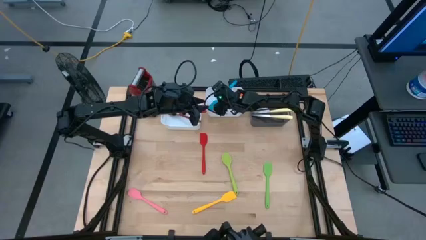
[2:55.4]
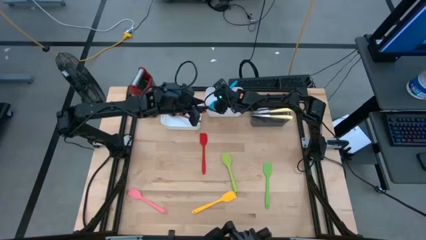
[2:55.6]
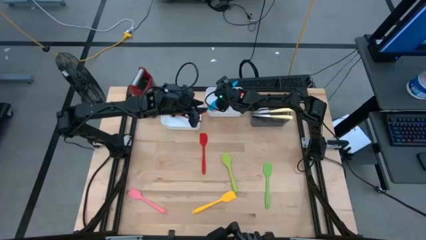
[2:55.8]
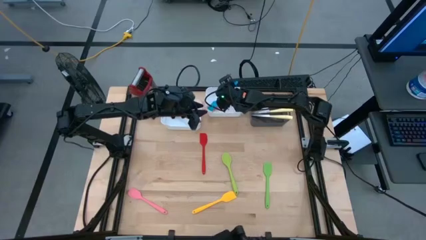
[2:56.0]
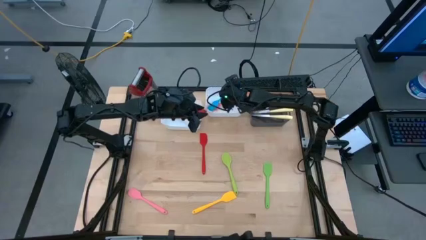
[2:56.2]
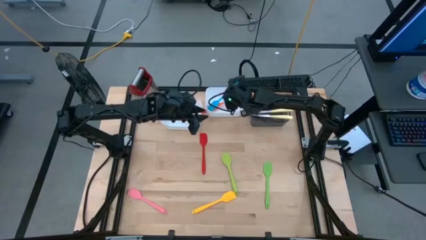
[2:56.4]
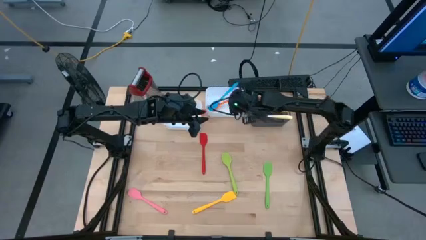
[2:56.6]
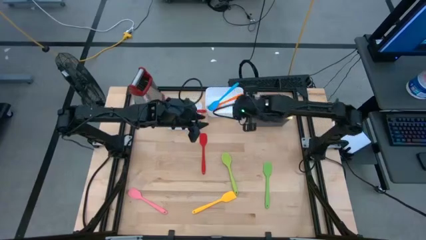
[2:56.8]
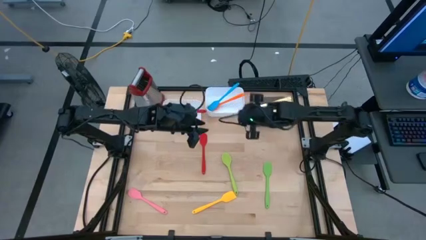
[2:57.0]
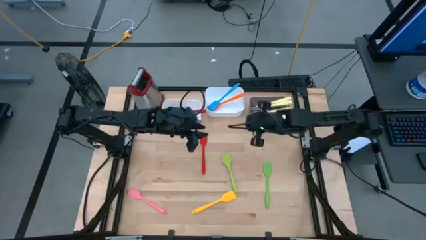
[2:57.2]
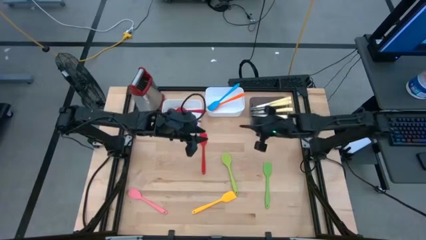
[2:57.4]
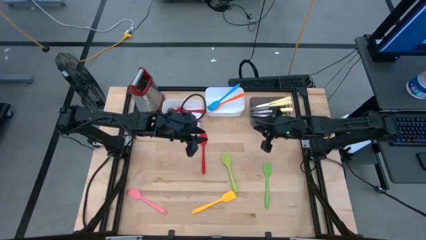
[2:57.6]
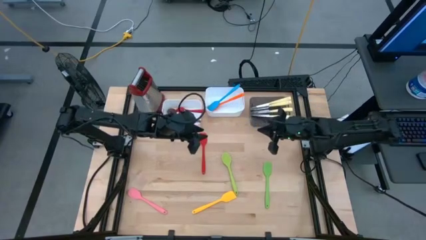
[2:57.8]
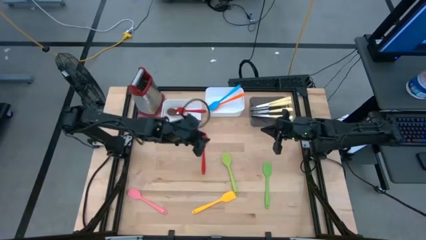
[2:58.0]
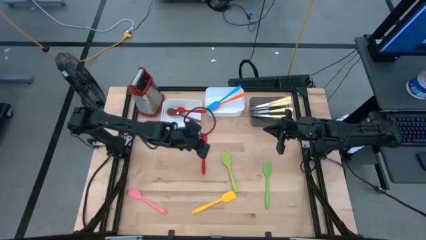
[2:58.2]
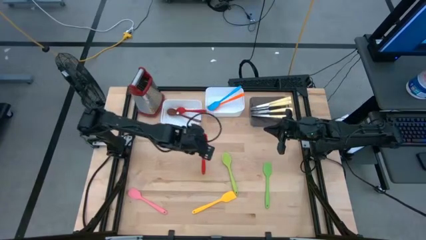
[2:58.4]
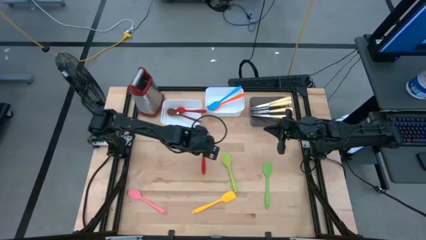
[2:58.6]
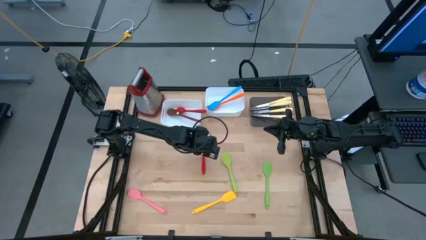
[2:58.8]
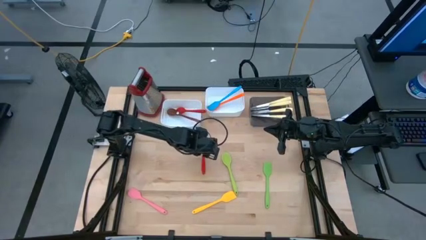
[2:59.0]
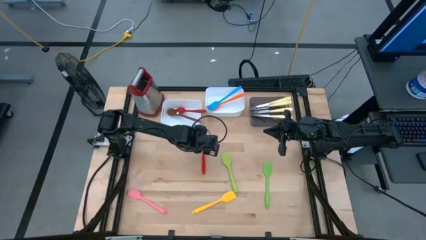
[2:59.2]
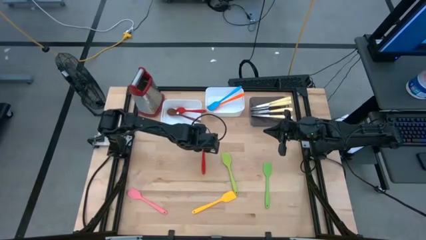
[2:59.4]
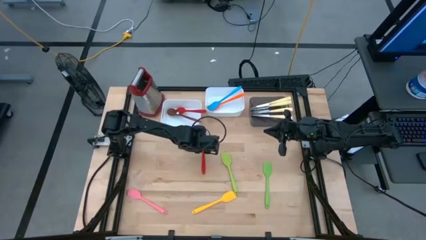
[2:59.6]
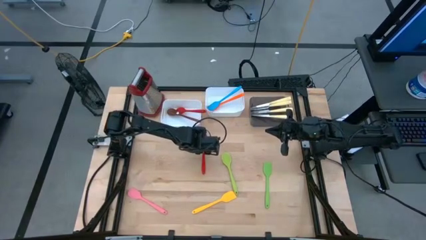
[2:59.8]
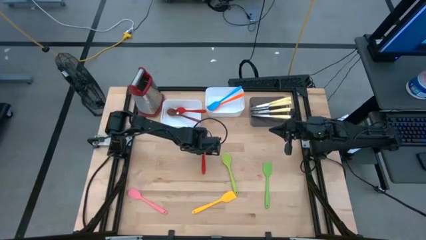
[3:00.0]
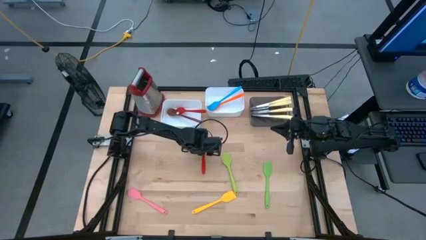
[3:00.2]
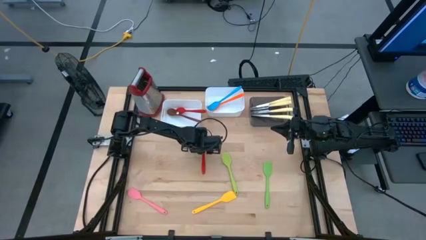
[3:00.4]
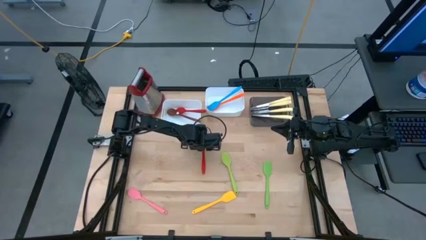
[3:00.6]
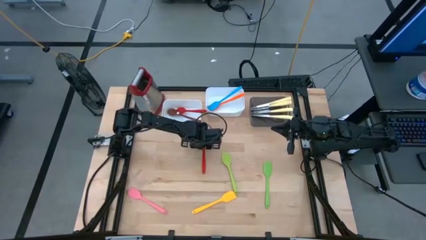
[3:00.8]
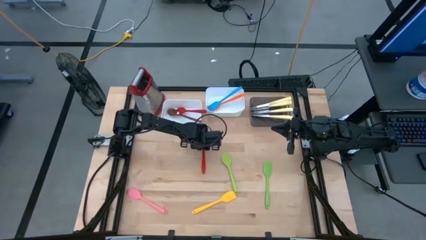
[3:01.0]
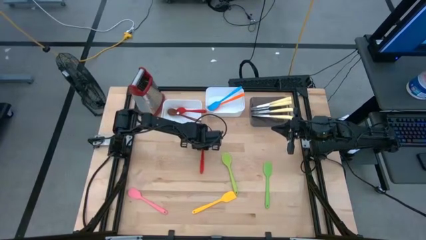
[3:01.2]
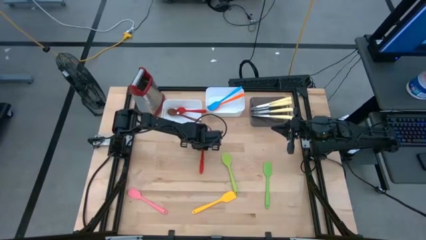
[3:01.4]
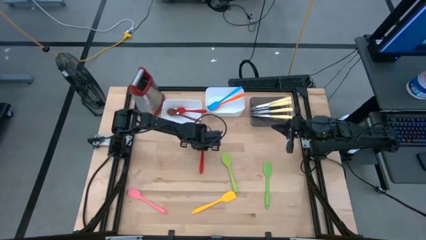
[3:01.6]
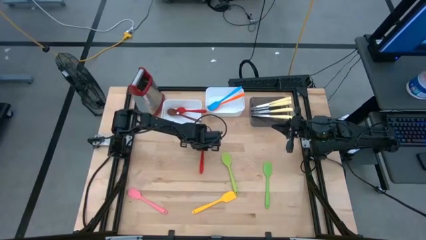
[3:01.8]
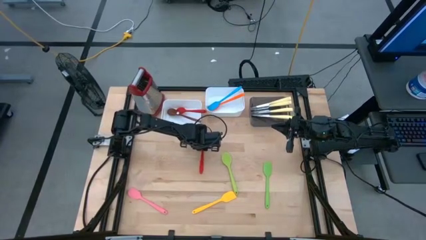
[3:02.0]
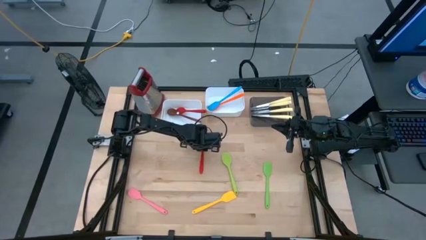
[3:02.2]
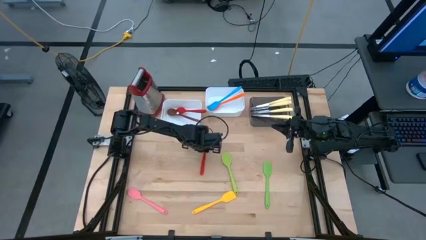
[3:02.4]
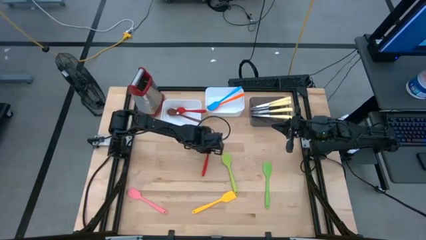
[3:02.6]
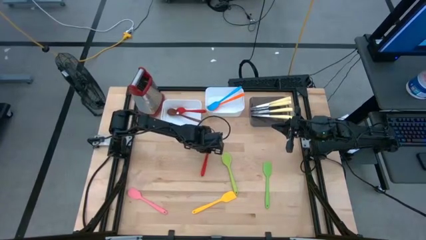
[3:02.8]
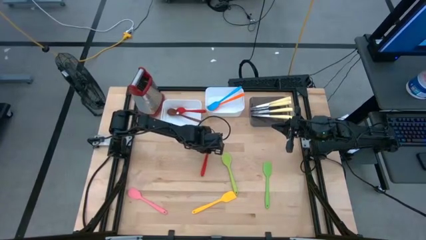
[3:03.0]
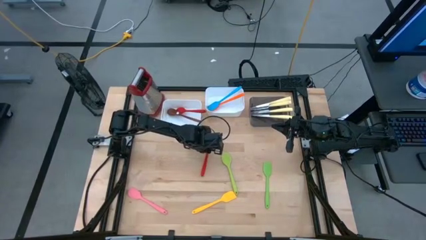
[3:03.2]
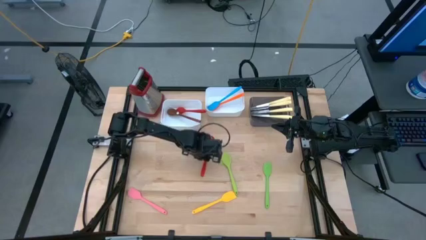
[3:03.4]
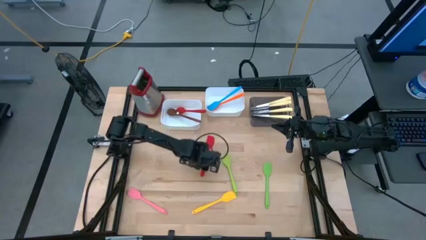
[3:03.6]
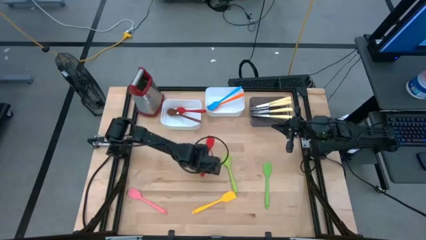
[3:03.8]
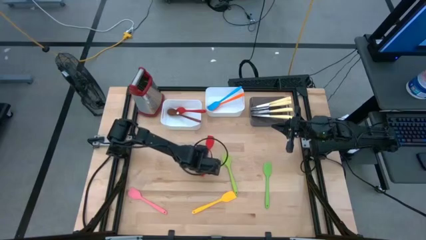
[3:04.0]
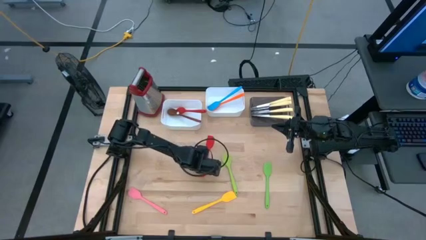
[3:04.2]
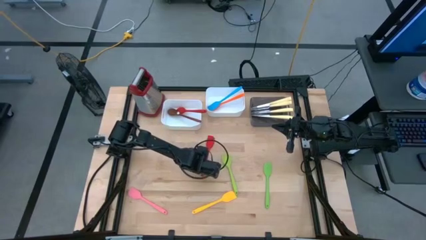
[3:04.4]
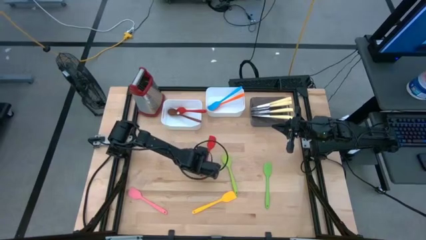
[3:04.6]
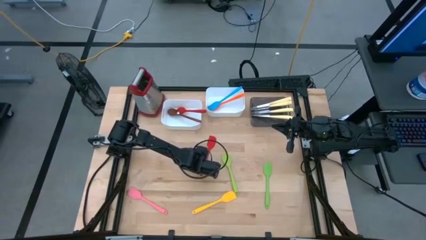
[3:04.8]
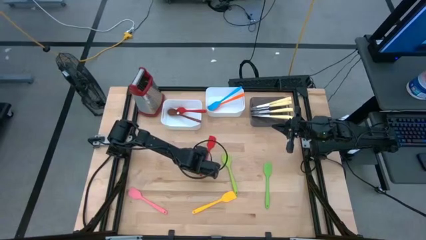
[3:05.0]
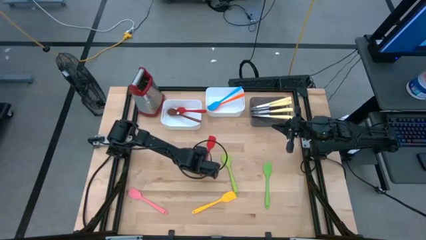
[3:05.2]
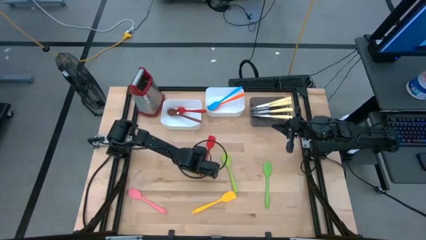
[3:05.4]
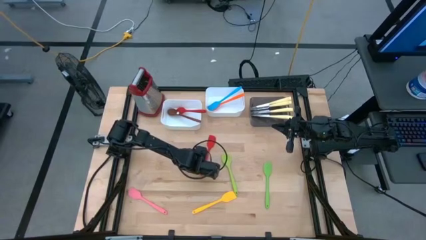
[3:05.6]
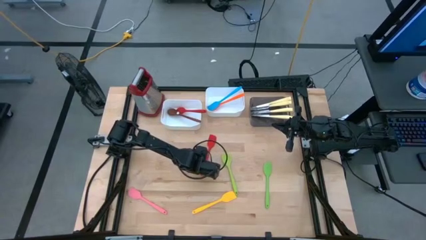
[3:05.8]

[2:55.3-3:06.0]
Task: Pick & Place Kitchen Items
Put the red spatula into the right white bin
